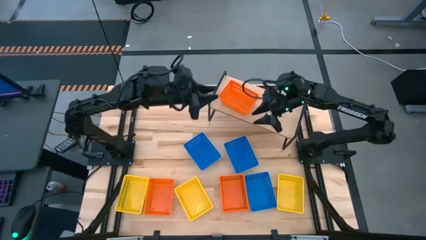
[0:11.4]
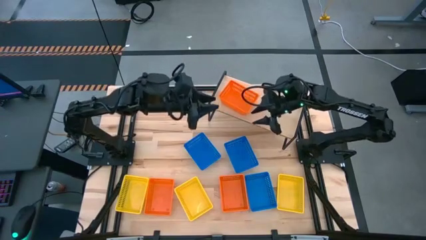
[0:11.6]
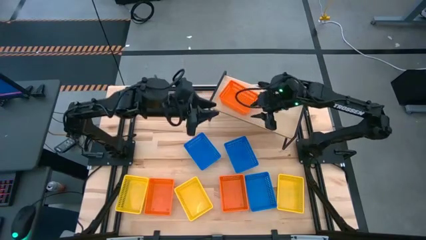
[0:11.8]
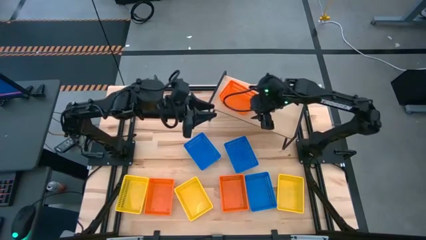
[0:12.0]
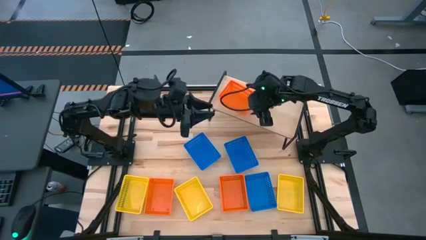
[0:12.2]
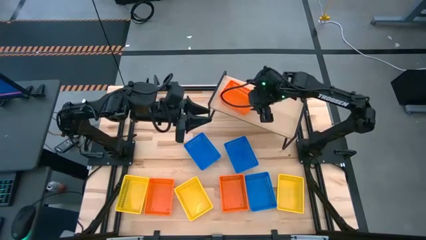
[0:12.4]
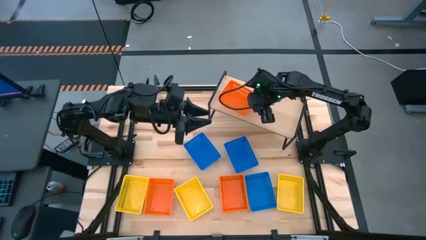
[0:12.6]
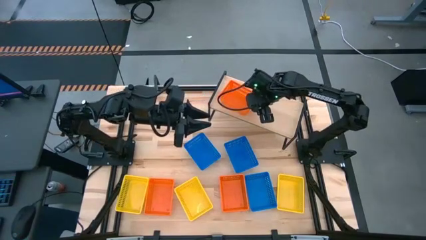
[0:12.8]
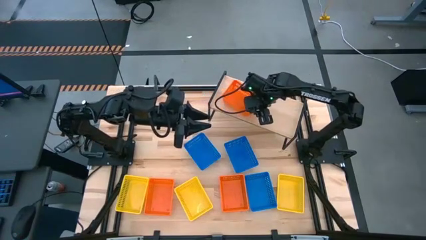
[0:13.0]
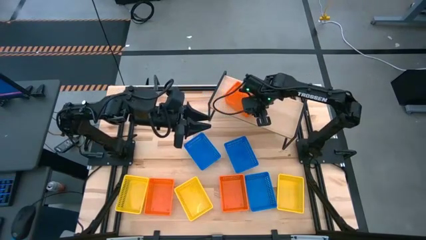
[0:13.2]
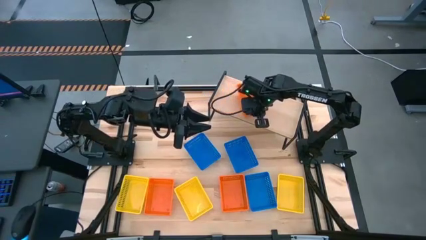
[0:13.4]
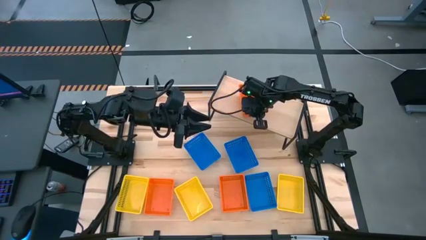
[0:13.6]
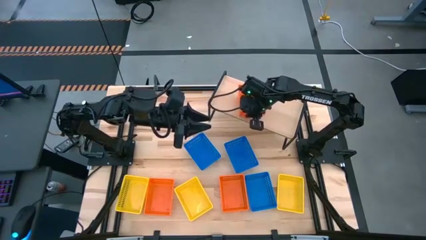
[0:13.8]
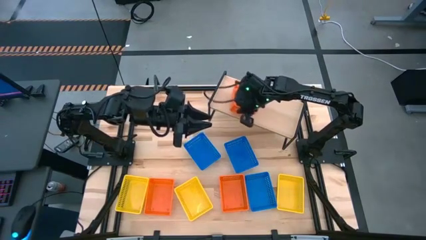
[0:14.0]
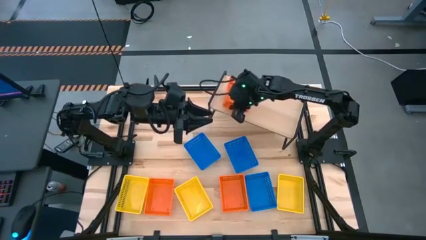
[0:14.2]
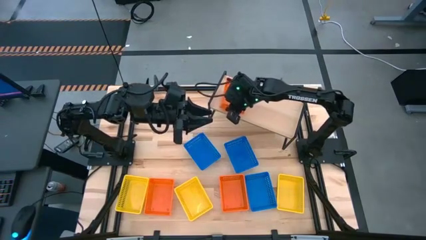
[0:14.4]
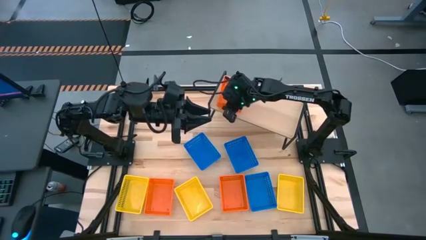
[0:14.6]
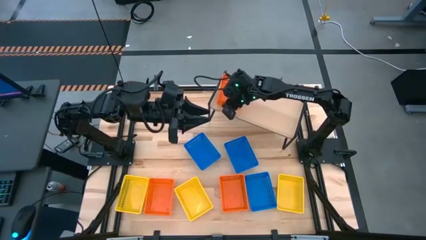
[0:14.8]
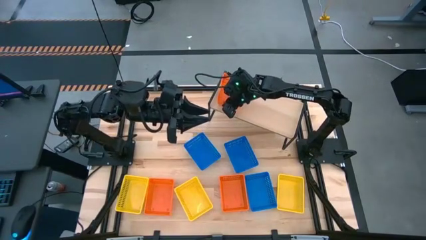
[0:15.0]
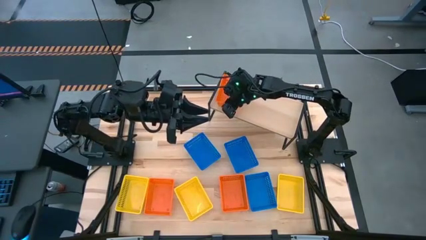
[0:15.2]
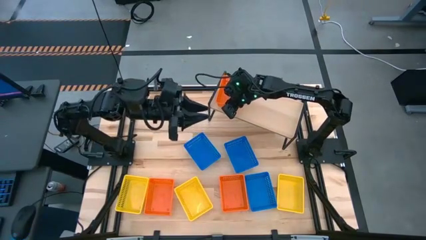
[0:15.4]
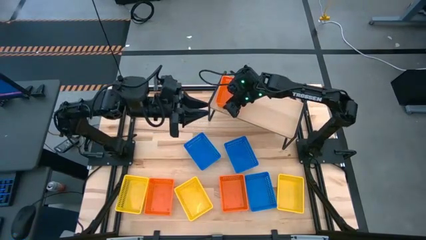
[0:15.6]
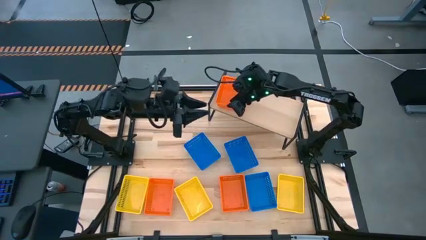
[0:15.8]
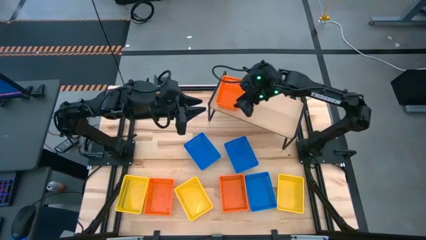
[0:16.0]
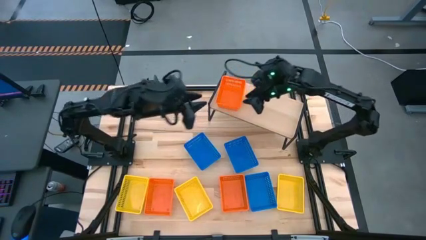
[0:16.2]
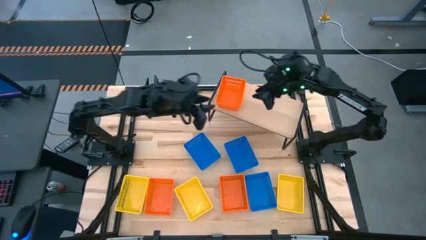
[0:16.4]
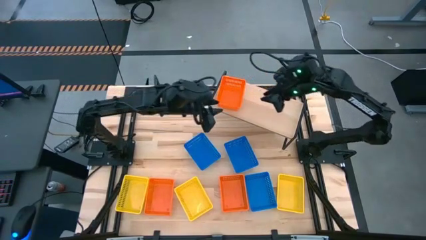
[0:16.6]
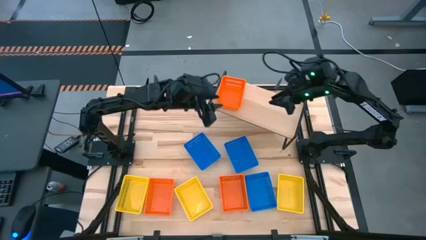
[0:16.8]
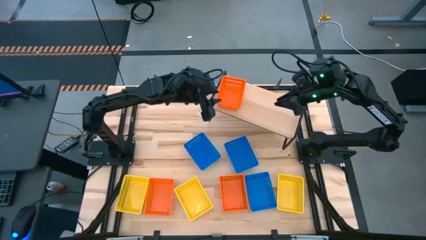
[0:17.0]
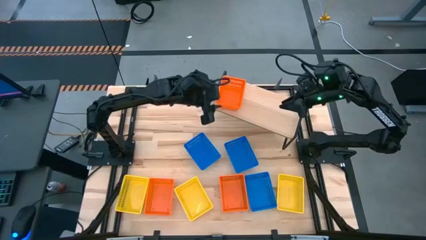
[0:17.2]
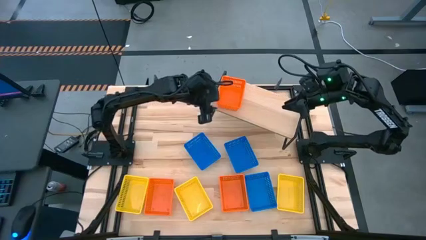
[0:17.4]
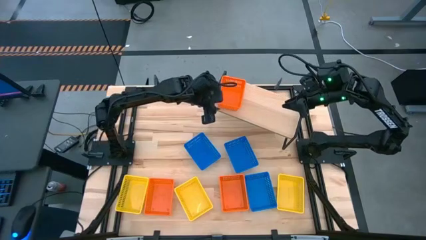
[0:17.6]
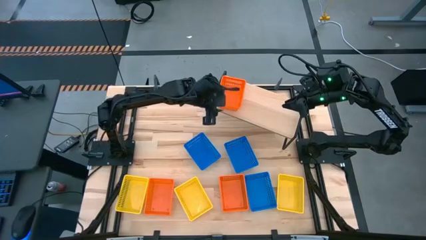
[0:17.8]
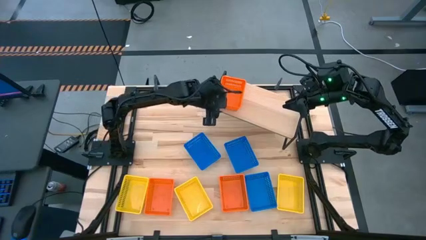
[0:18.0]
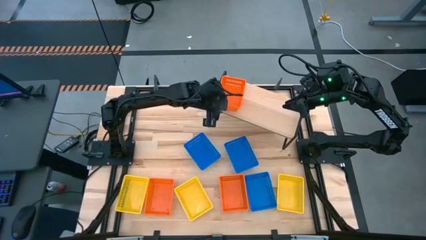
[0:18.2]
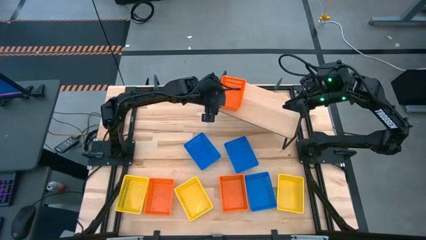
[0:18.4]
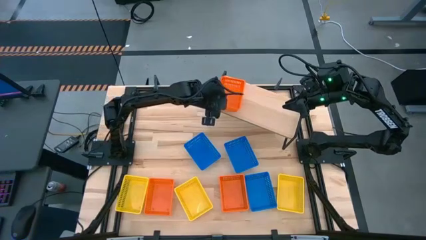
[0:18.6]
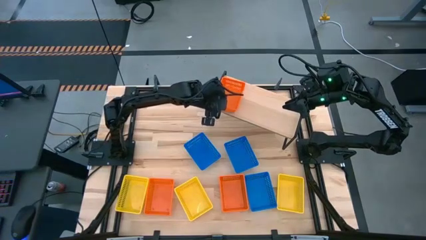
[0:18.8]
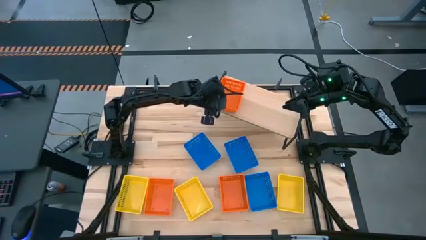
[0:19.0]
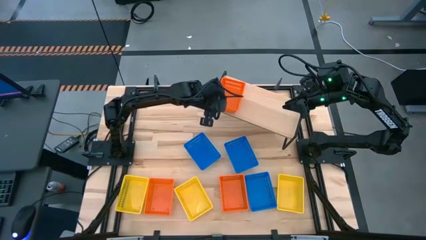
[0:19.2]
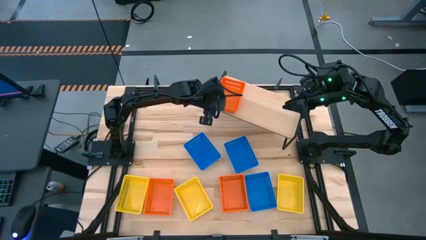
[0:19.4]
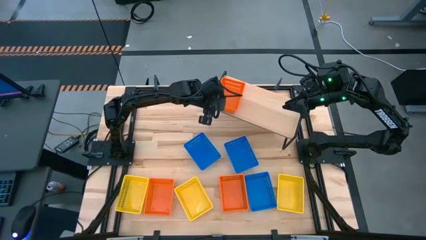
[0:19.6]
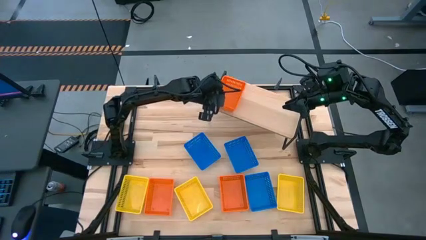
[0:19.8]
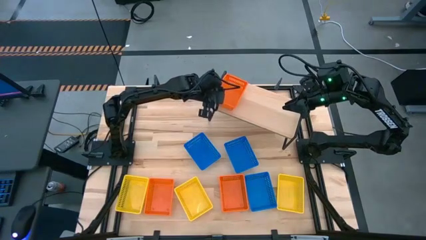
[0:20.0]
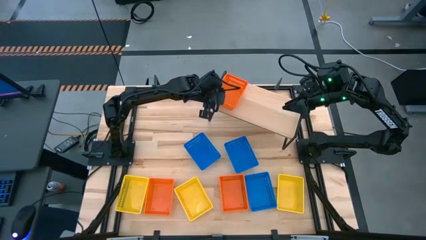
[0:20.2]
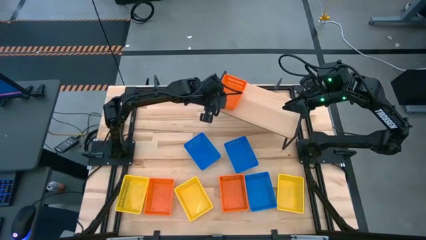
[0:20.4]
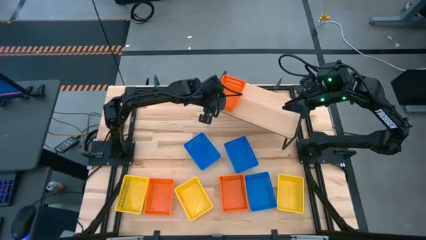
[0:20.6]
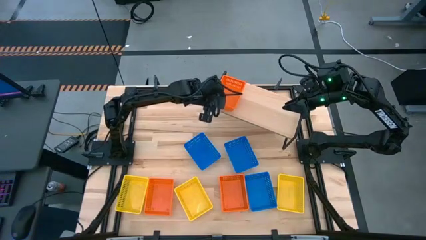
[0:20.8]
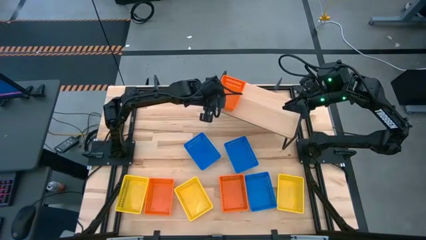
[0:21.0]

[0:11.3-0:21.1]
Task: Stack baskets on shelf by color
Put the top orange basket on the shelf

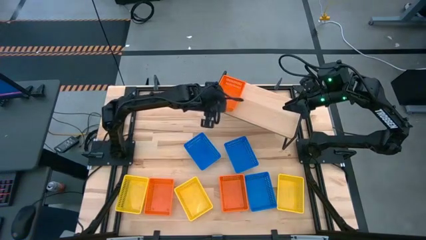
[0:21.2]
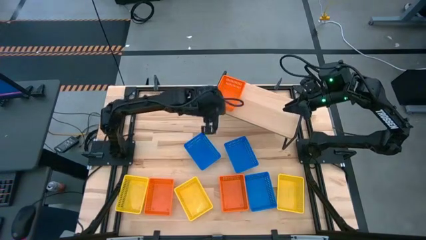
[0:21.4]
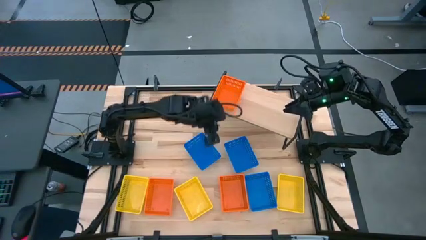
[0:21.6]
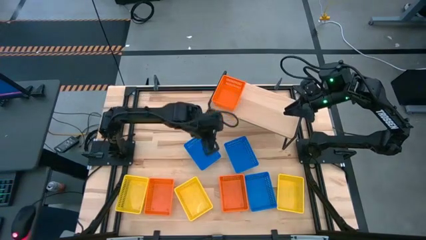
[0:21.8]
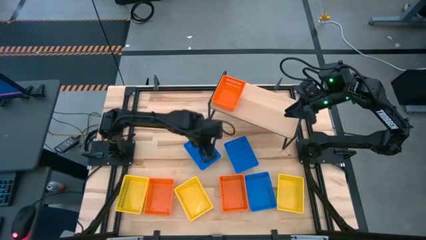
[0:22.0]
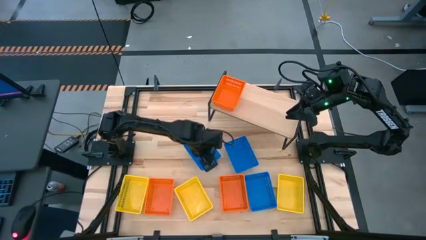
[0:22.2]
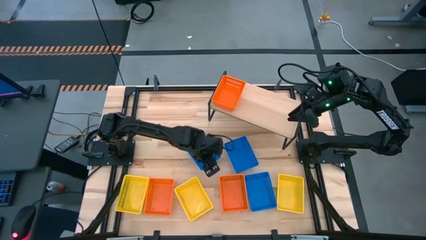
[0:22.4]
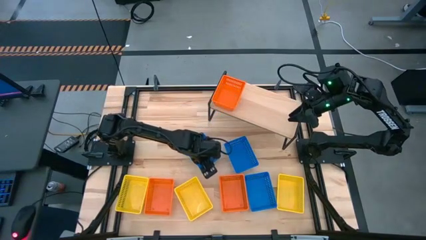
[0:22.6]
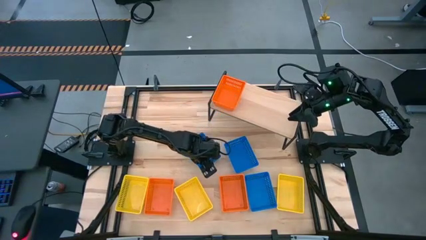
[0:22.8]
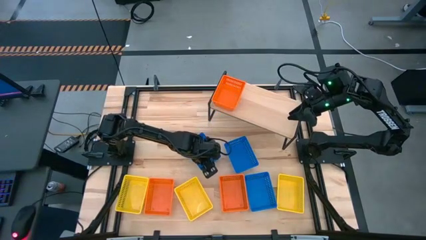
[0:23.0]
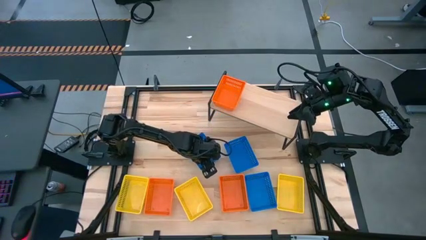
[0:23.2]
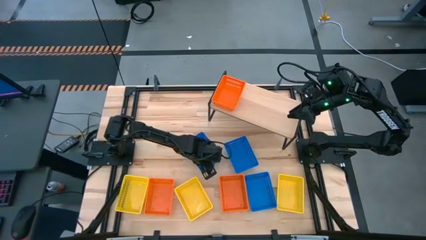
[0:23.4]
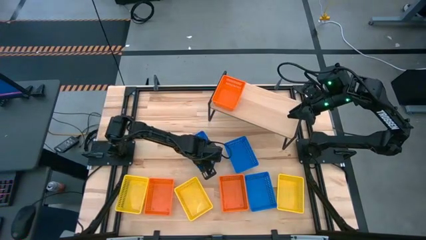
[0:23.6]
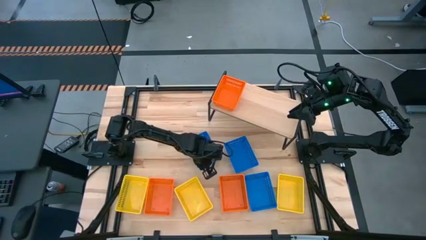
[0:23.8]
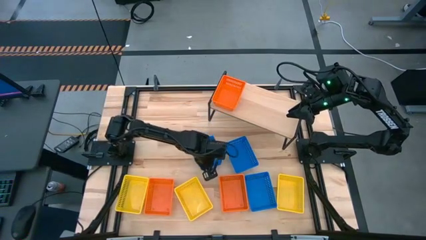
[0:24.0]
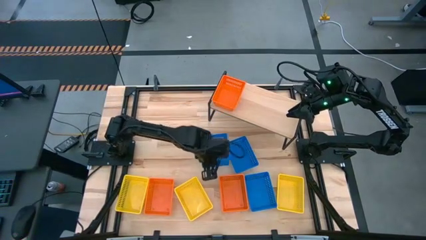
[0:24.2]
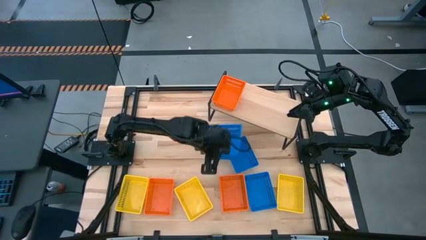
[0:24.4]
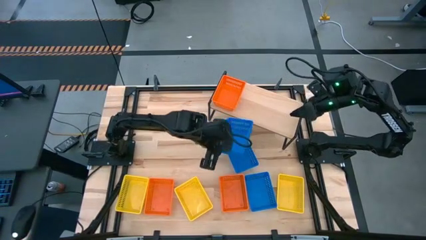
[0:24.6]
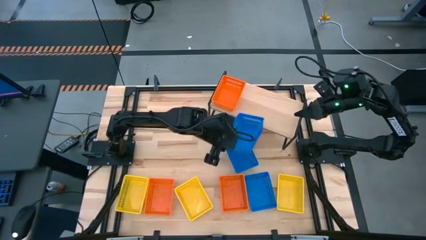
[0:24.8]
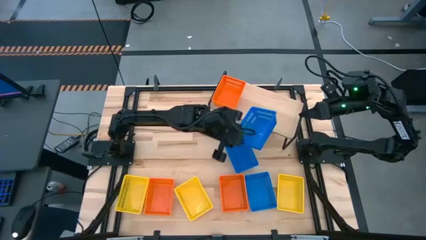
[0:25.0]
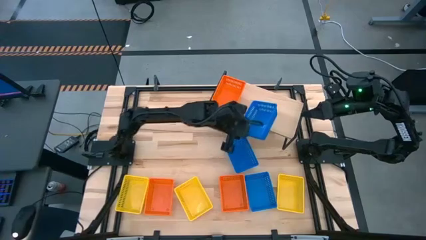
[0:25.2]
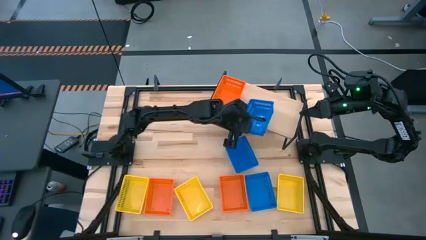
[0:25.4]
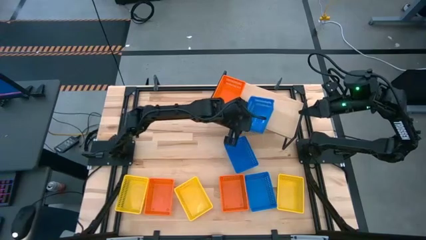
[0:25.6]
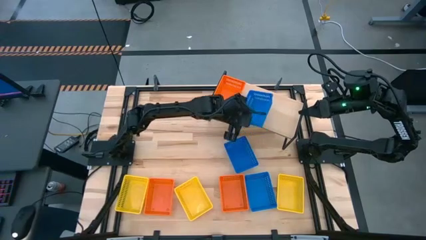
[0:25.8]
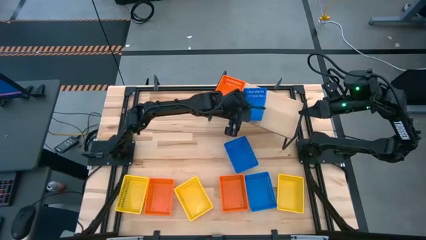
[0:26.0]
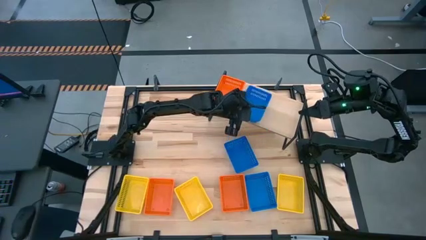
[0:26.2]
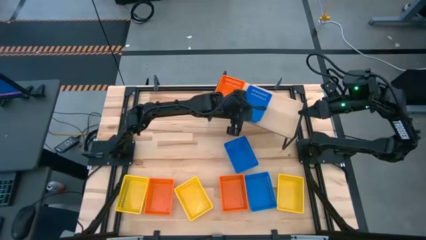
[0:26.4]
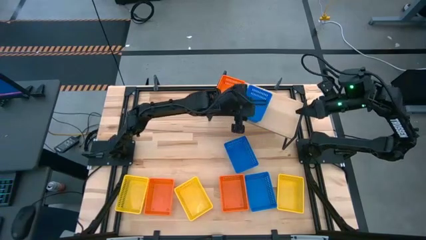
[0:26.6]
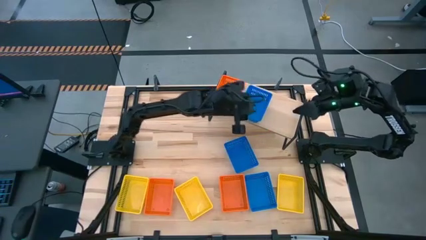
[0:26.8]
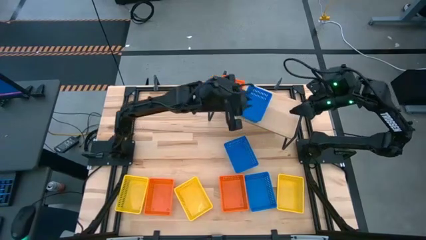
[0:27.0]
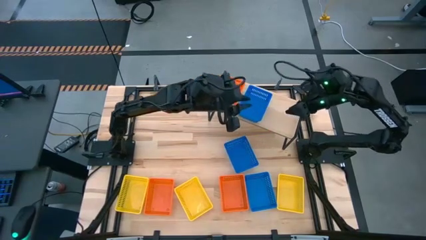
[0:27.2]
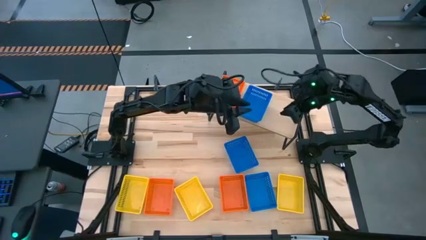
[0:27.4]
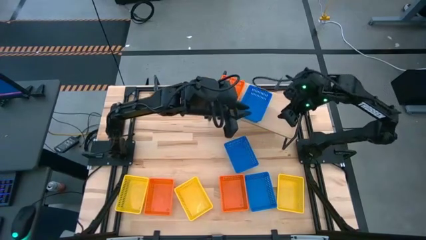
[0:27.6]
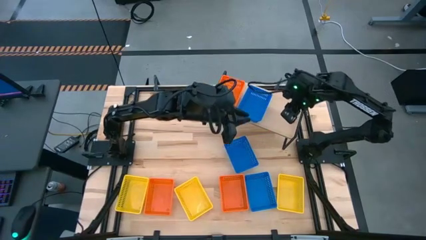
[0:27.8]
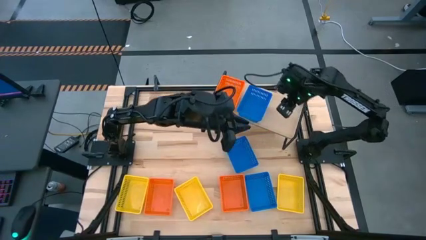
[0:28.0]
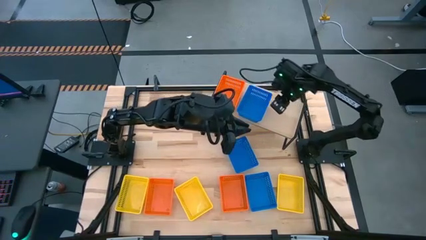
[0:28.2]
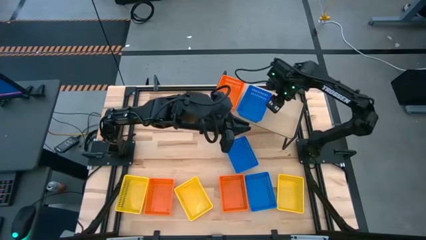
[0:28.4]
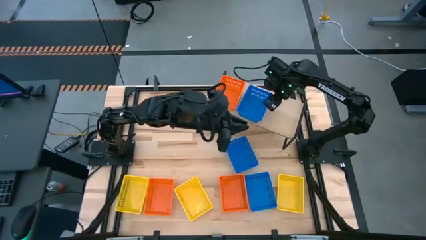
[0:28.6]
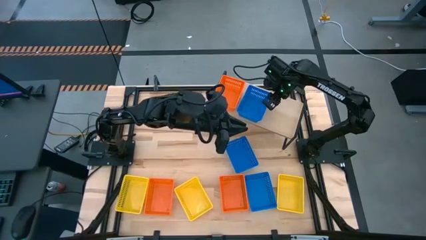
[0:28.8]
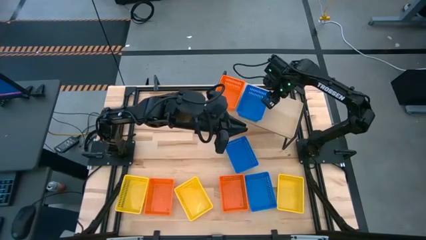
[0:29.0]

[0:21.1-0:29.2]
Put the left blue basket on the shelf
